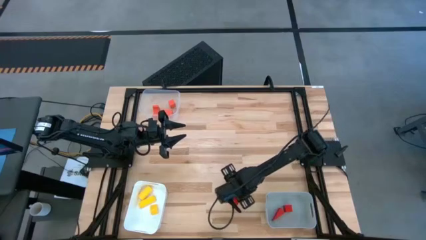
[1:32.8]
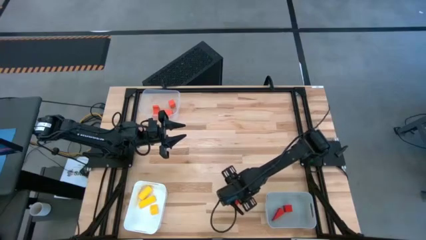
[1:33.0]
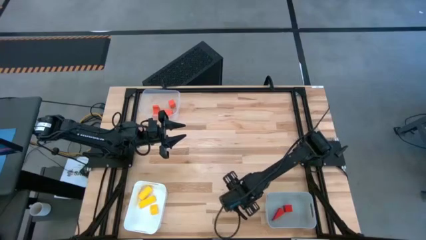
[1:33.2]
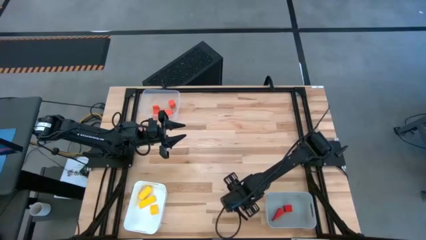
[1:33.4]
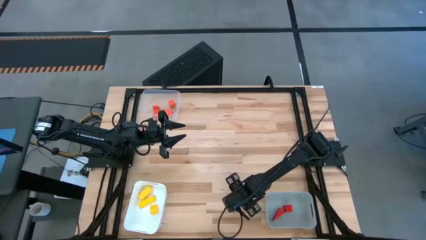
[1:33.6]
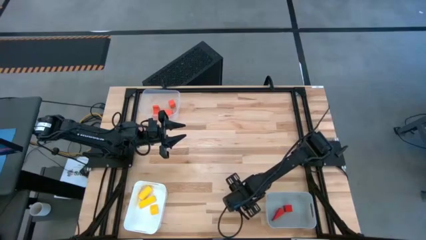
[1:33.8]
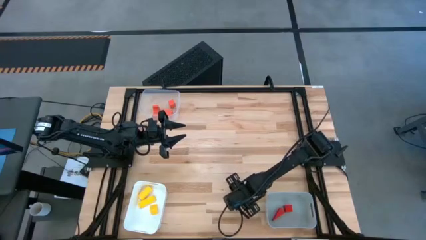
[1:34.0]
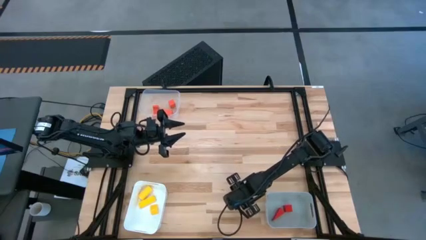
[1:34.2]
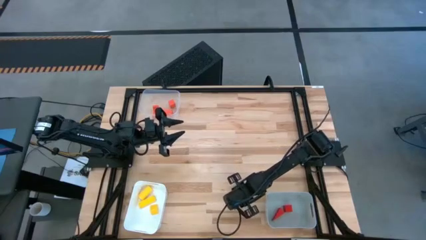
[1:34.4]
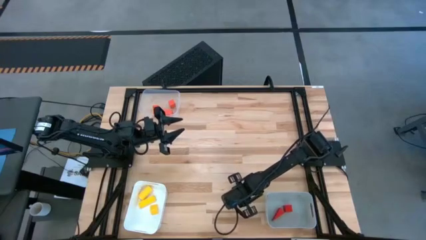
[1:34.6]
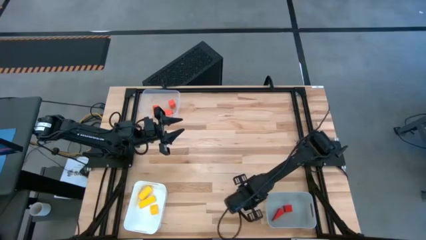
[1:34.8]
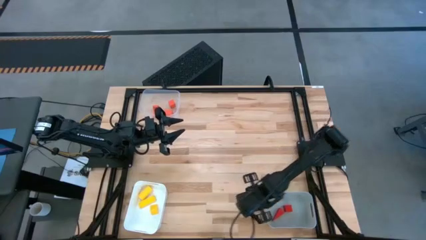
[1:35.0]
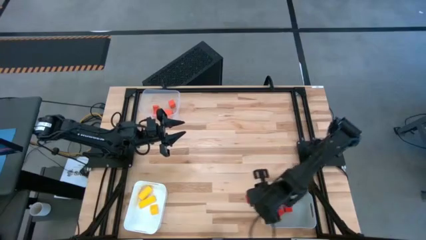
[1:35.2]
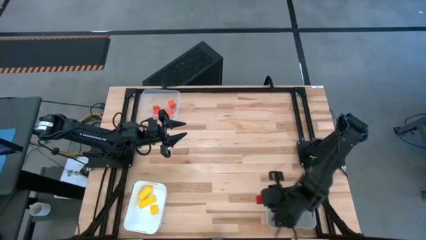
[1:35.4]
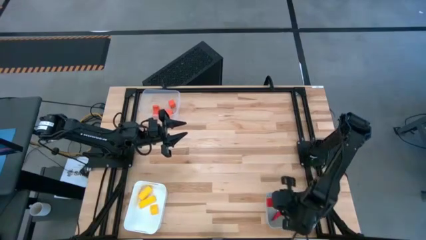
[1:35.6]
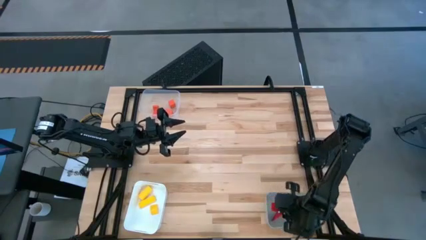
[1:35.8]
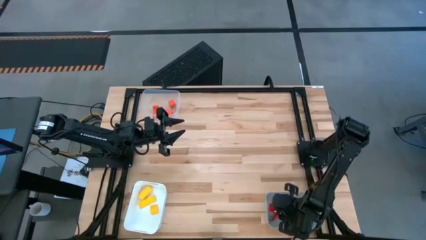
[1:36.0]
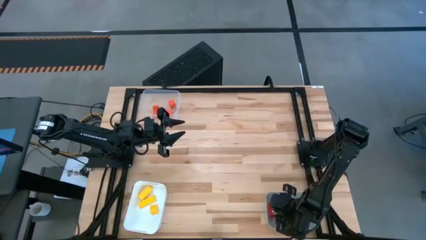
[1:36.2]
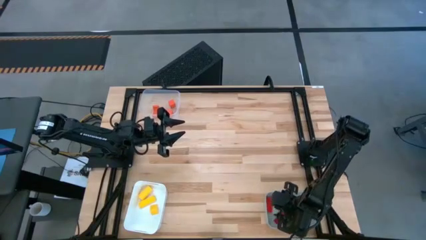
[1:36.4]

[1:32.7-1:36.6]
Task: Sort & place blocks by color
Put the red block into the gray bin

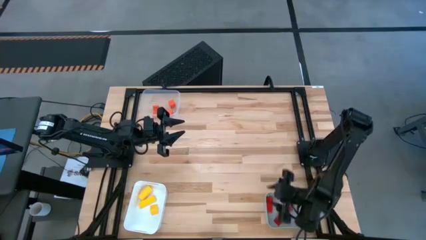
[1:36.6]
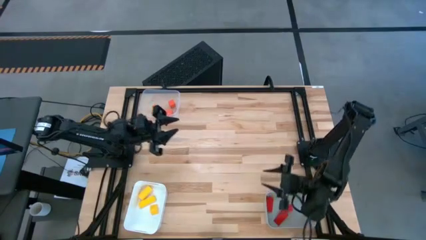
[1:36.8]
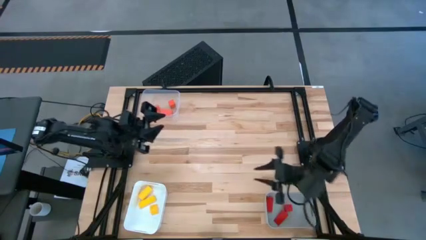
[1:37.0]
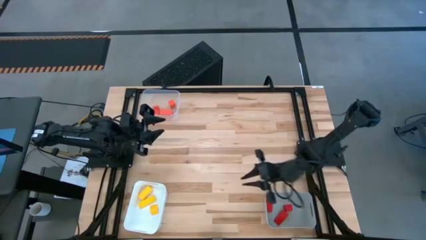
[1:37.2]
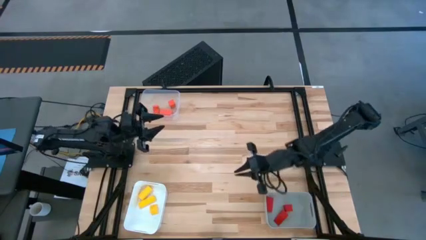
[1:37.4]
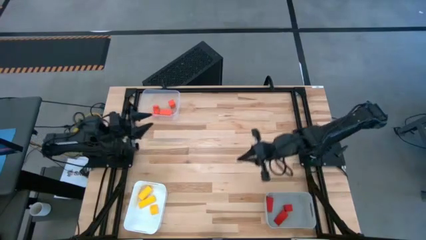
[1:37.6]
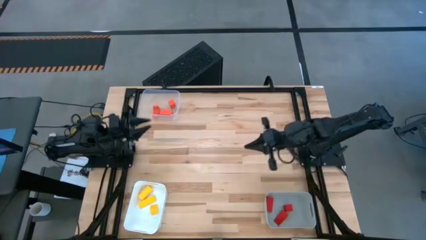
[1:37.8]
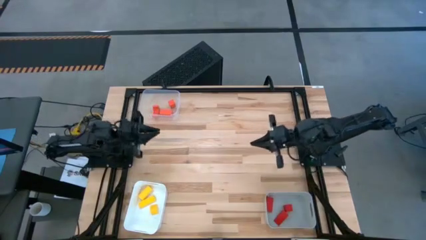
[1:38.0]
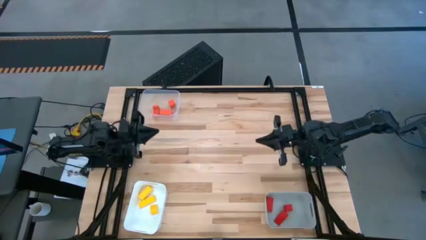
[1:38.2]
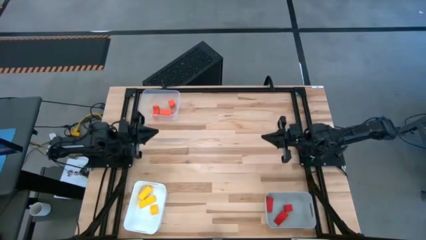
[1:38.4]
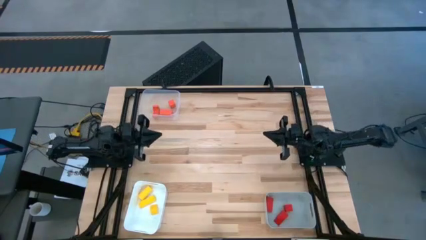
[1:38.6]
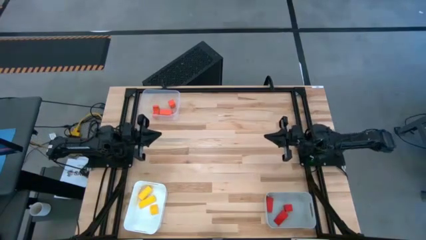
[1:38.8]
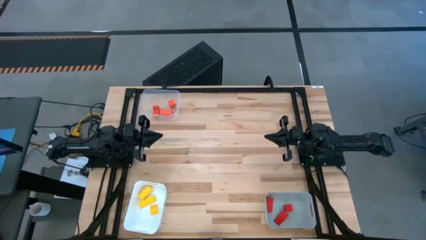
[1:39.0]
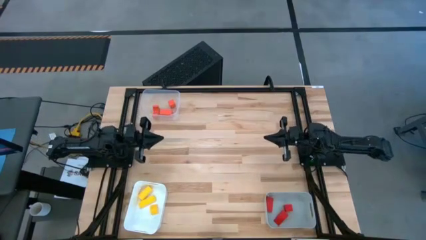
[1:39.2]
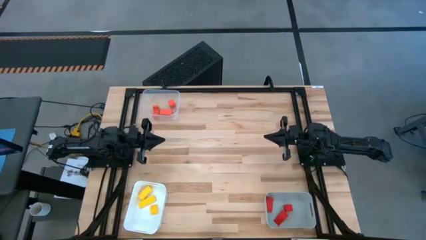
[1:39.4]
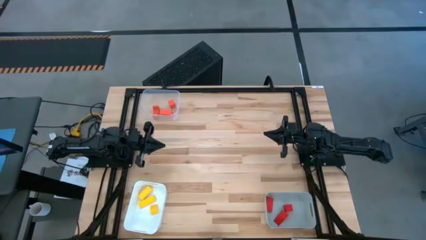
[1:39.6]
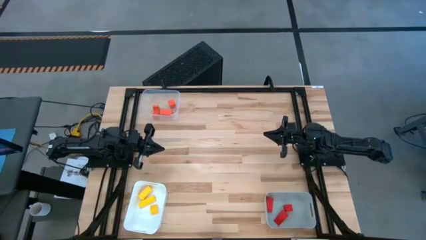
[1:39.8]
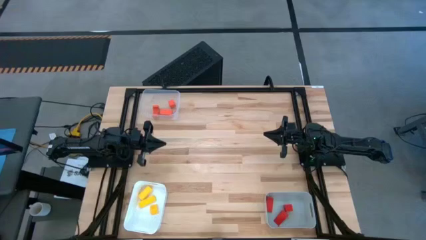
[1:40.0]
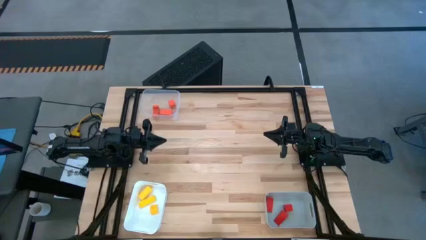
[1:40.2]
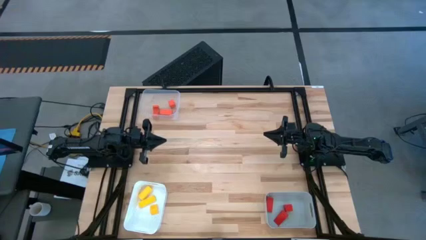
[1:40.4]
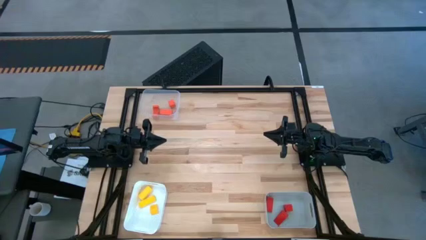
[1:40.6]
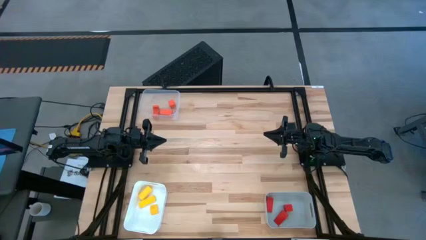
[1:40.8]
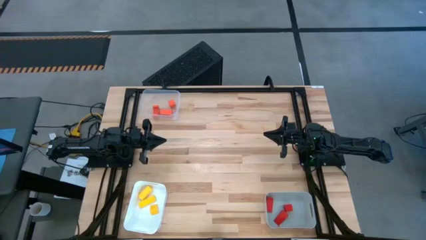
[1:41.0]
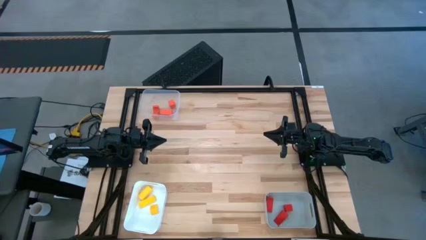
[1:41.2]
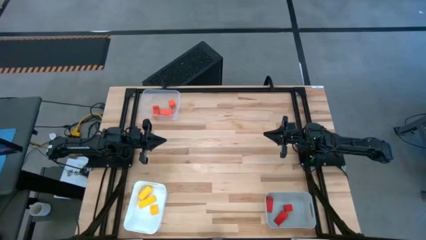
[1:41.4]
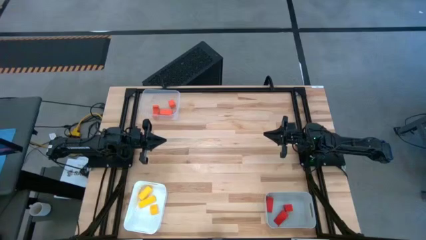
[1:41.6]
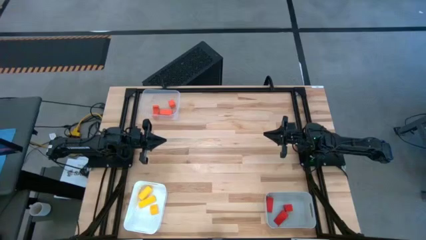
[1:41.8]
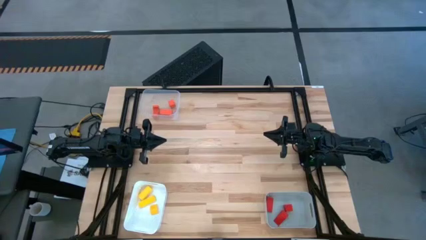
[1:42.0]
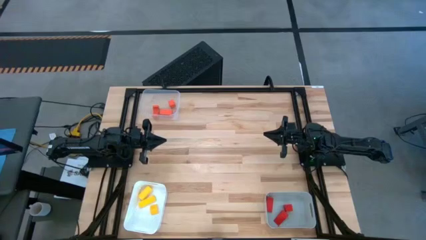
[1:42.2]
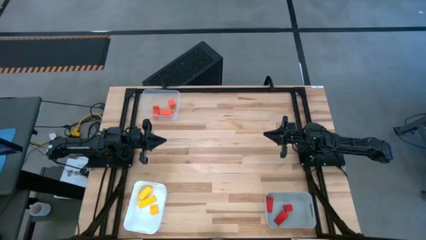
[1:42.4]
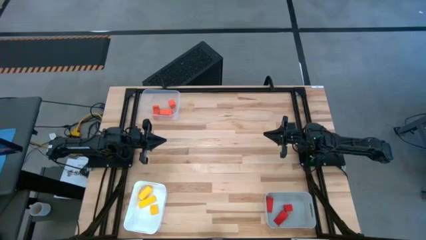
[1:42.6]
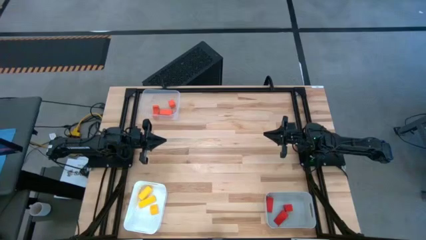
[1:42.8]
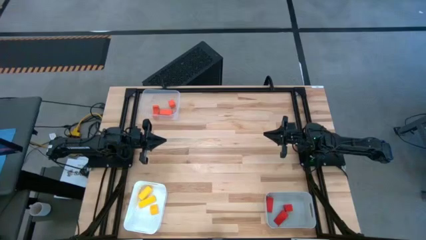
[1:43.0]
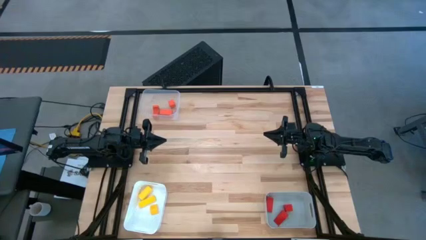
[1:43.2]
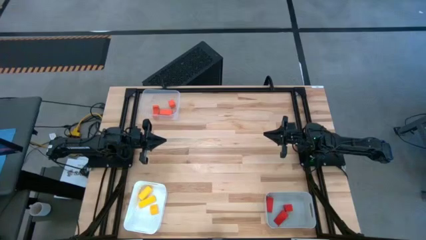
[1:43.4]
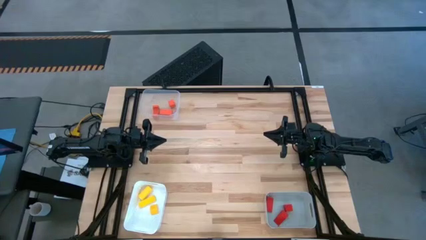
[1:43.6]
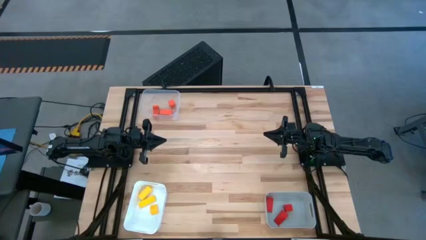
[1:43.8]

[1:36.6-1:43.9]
Return to Home Position
